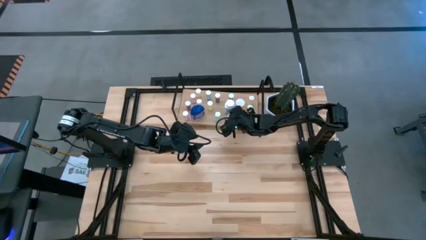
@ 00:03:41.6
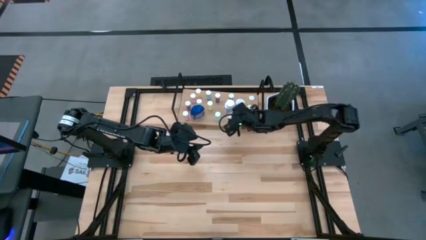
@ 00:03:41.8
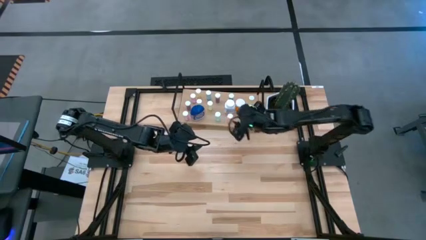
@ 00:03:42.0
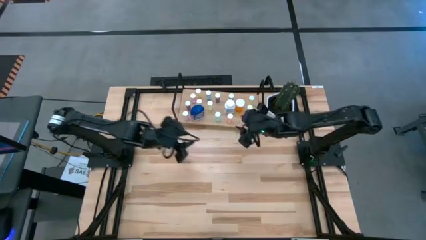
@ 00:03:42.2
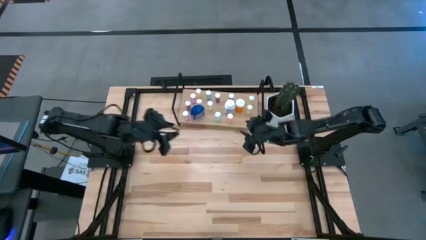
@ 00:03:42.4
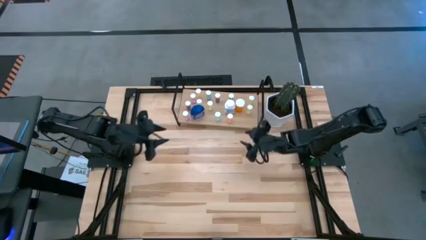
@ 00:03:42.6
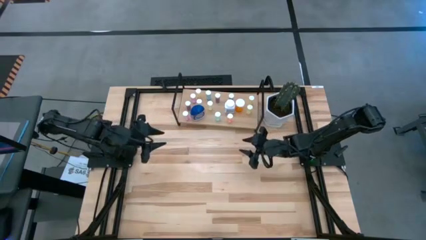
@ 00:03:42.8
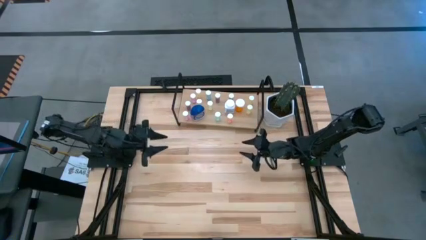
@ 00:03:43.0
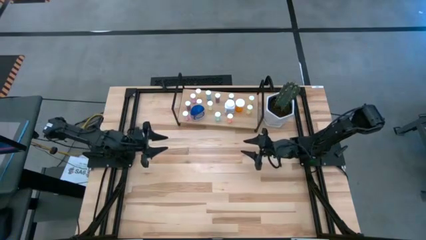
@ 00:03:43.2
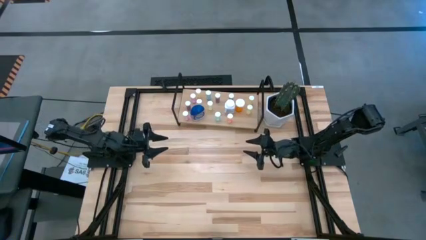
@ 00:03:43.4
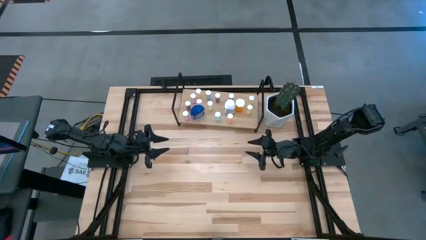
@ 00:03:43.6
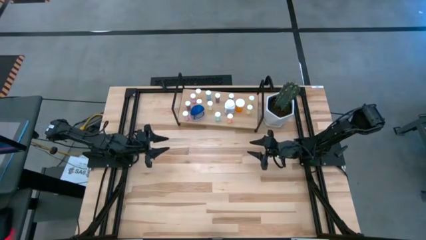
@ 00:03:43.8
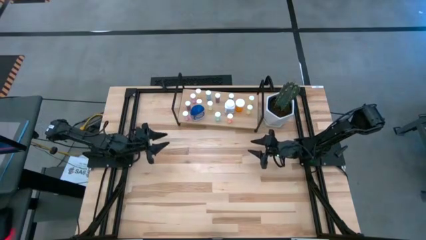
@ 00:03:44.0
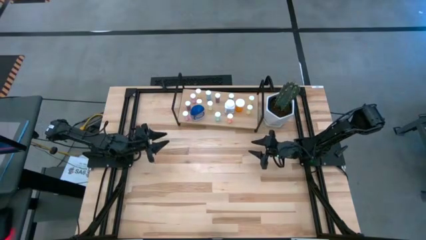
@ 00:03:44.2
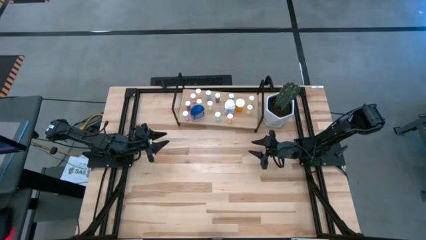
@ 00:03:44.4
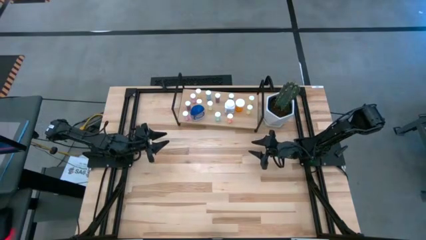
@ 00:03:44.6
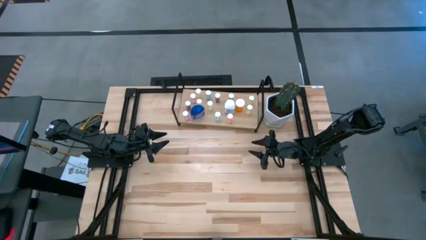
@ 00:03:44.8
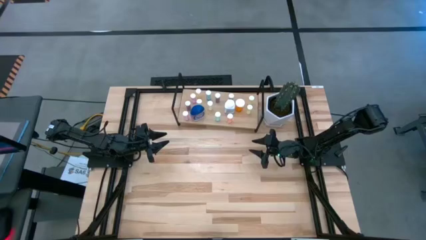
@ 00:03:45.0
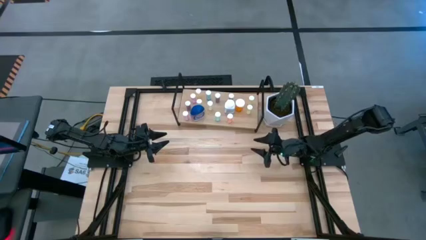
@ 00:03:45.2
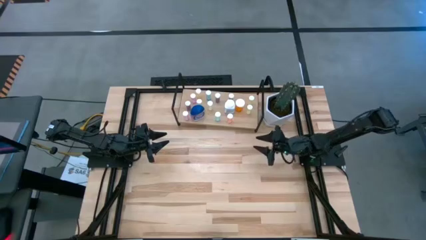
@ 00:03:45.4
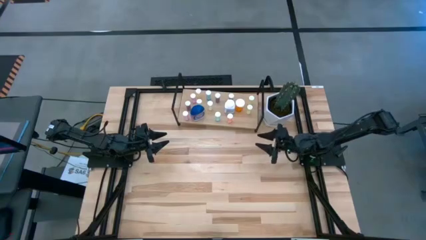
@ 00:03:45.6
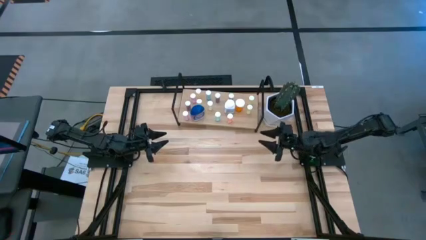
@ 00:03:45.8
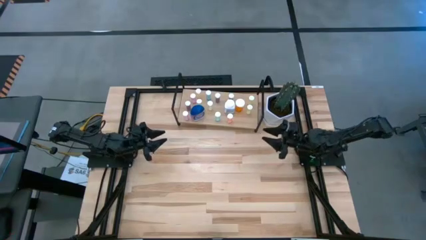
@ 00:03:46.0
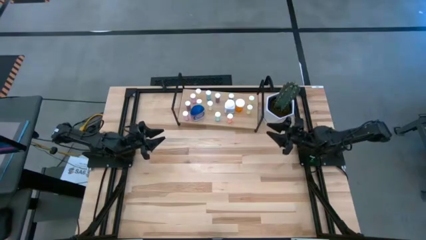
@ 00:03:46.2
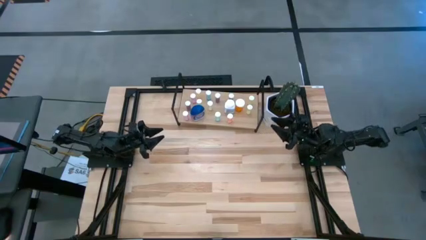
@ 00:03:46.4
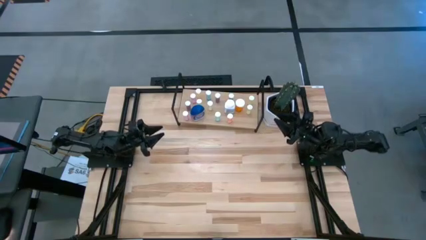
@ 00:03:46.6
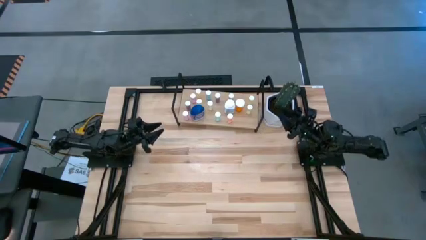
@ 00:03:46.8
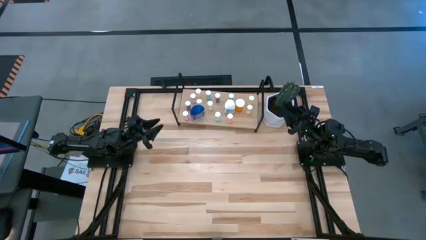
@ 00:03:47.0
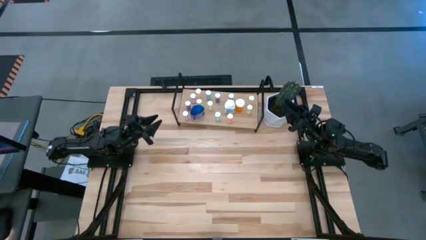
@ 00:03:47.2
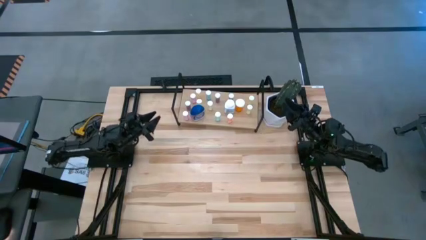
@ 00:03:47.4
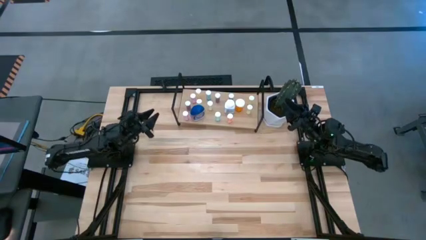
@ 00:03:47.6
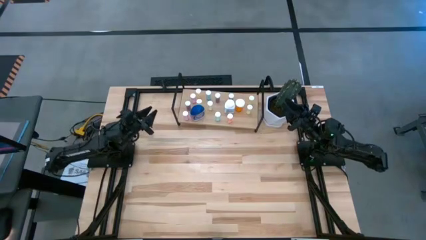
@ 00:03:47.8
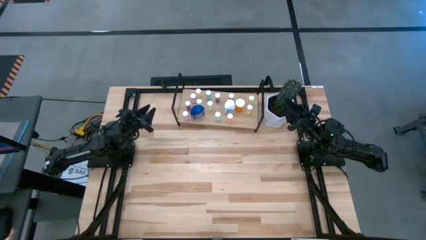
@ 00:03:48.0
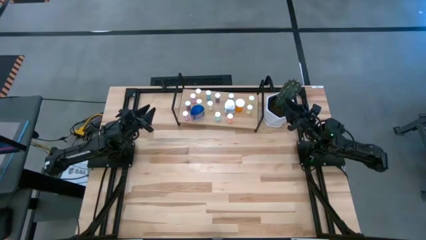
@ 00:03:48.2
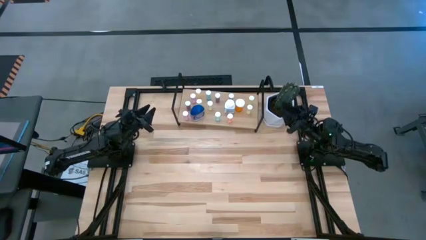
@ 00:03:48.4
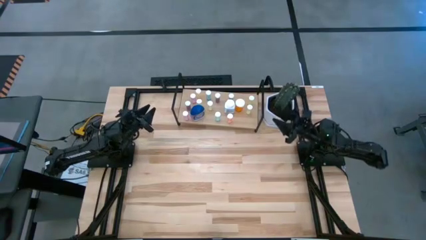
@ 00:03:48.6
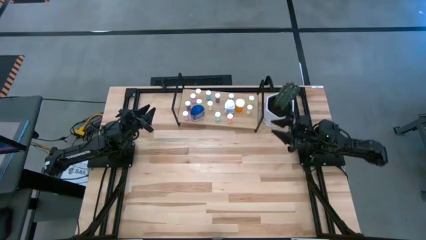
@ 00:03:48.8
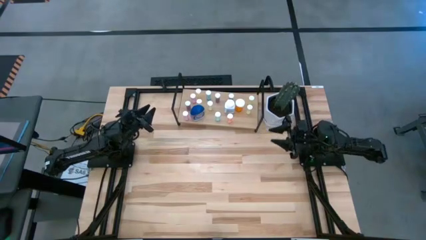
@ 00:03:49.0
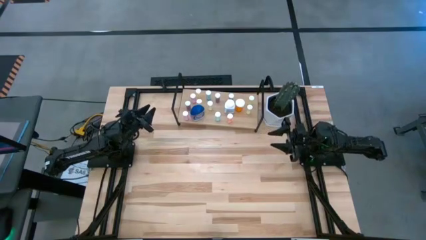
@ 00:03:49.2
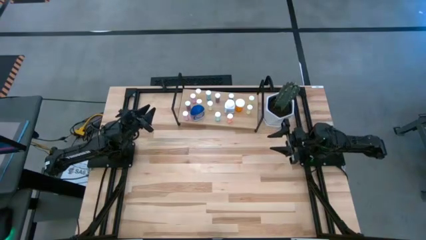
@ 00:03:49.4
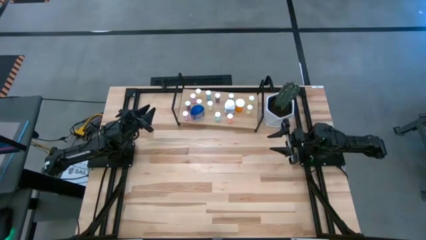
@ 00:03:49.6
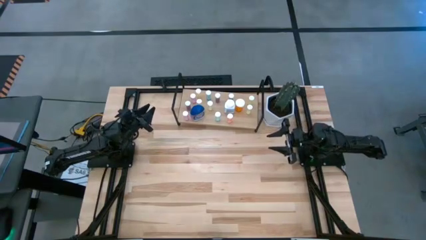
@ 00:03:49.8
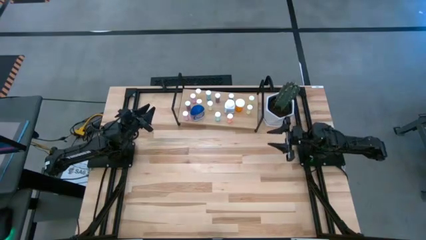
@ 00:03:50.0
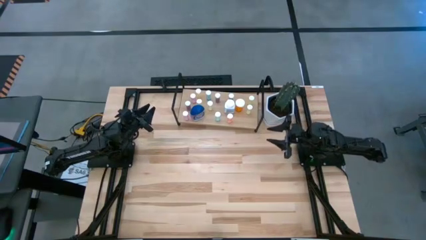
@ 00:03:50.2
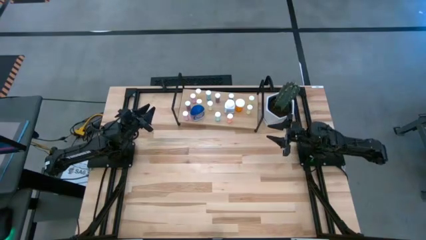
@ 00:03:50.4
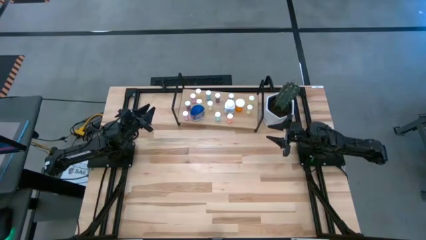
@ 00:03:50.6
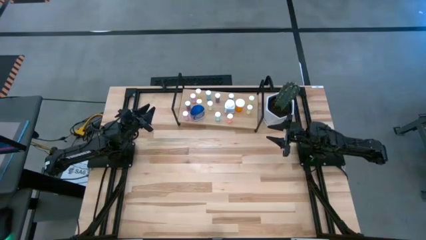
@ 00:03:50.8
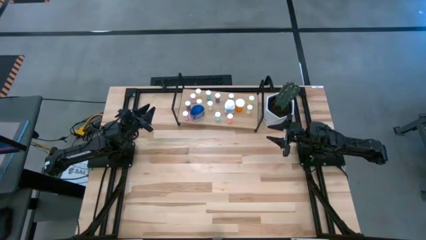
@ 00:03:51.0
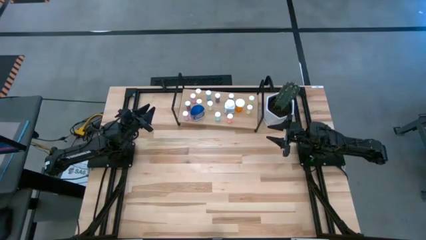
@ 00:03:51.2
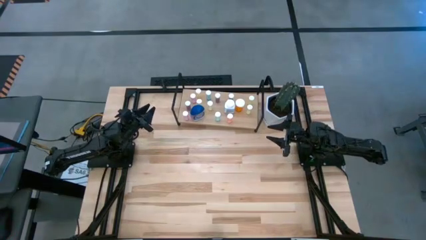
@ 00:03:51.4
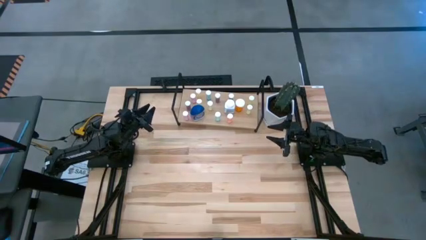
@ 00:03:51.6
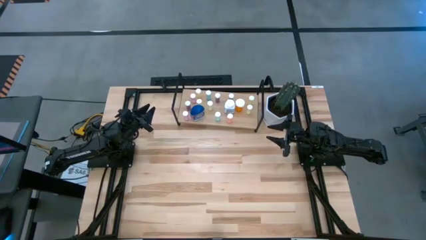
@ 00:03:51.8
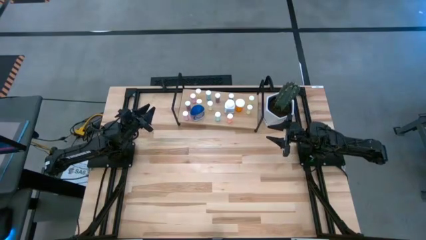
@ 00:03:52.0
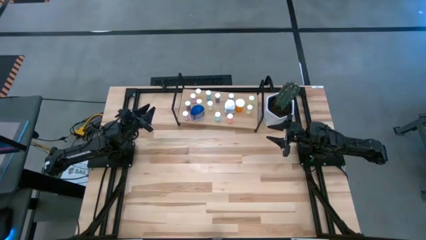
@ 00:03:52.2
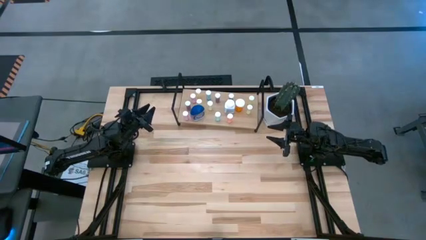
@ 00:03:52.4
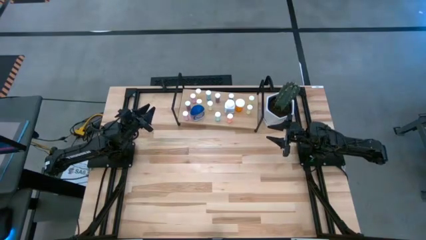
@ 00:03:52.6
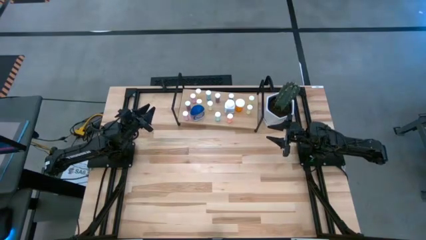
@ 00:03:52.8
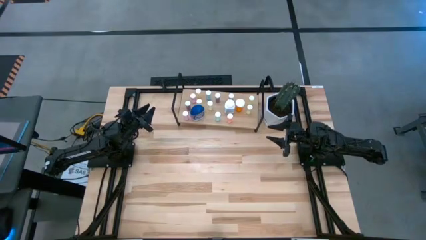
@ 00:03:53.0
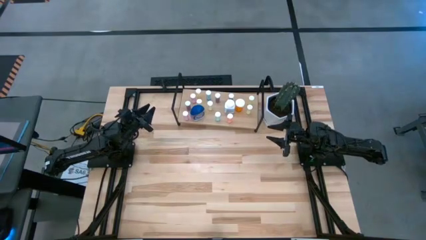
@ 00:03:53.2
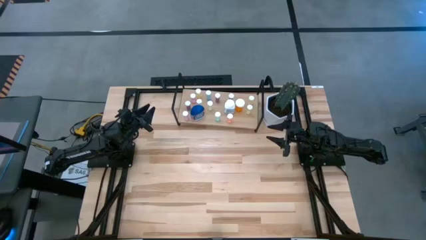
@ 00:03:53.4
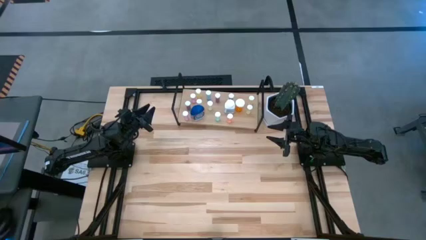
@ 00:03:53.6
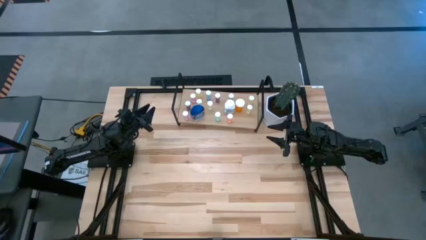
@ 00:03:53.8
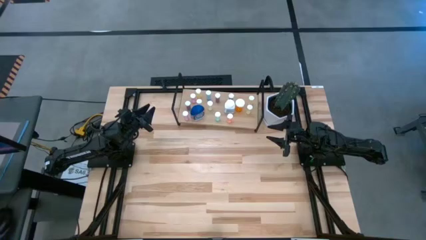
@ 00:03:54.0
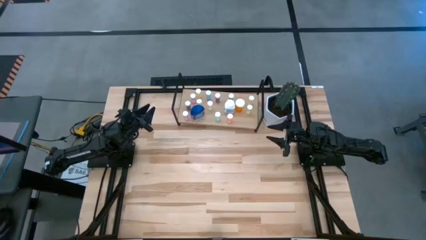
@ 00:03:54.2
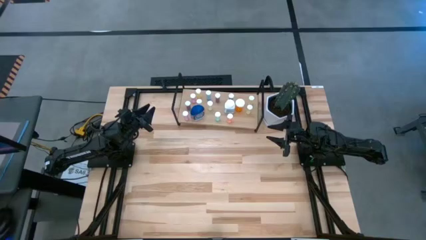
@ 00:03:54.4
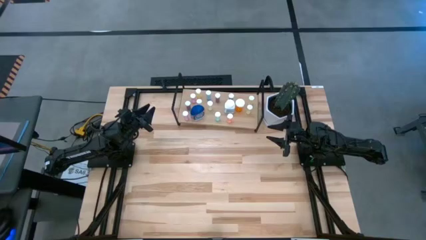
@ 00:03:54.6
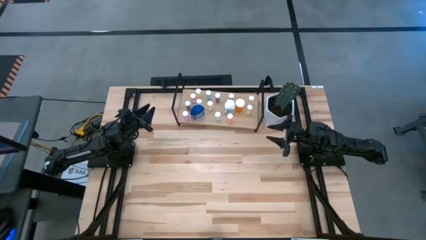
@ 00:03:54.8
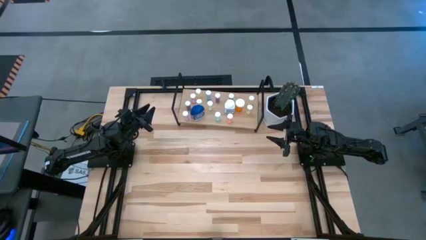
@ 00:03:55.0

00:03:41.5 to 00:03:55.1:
Task: Pick and place medicine bottles onto shelf by color
Return to Home Position
